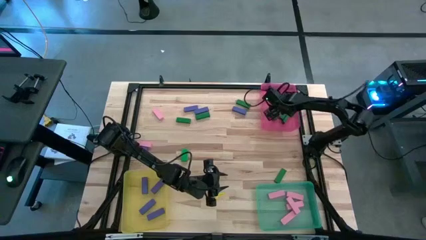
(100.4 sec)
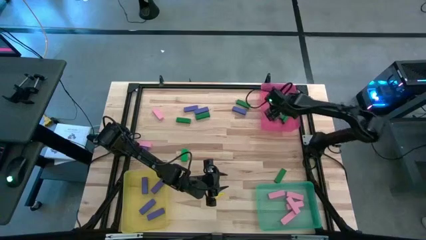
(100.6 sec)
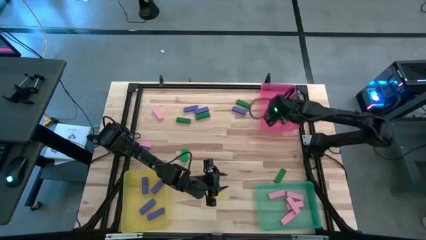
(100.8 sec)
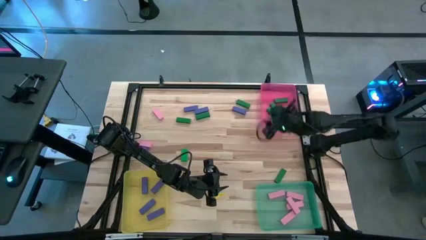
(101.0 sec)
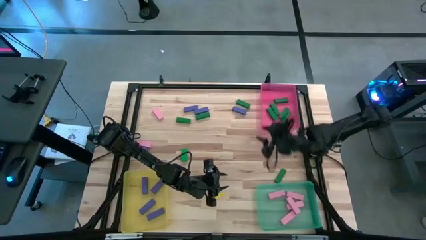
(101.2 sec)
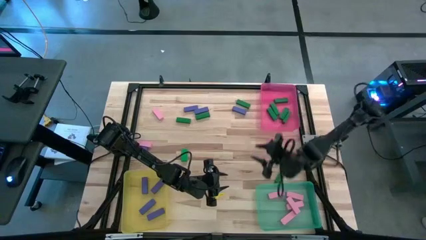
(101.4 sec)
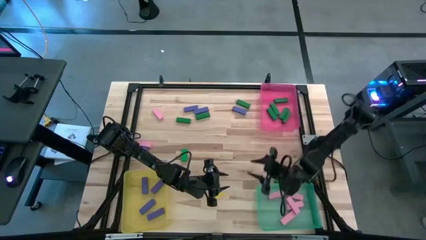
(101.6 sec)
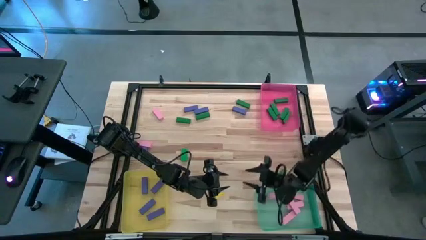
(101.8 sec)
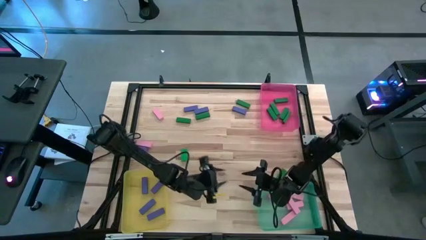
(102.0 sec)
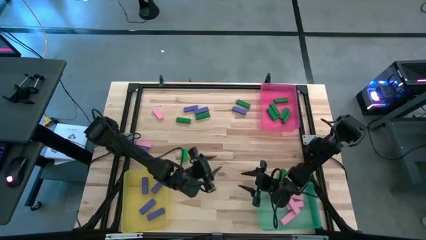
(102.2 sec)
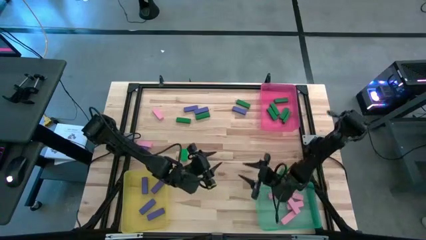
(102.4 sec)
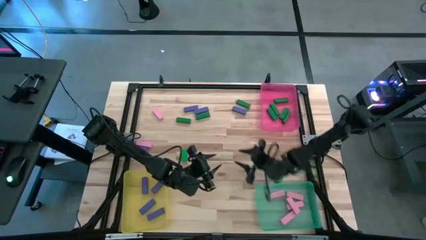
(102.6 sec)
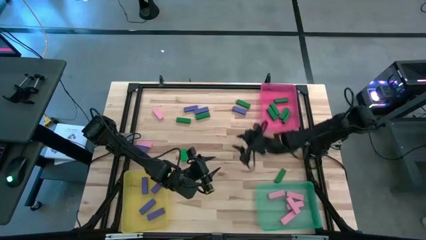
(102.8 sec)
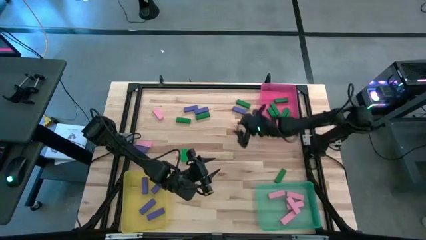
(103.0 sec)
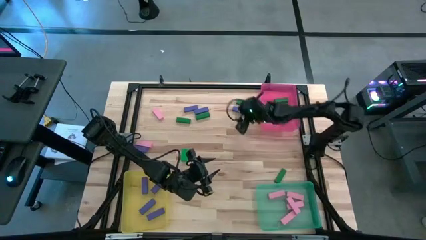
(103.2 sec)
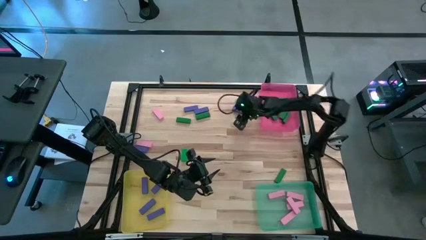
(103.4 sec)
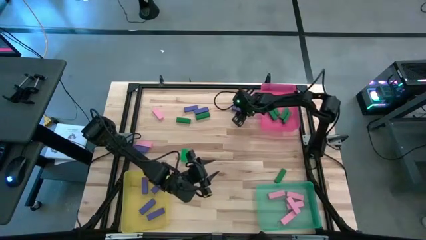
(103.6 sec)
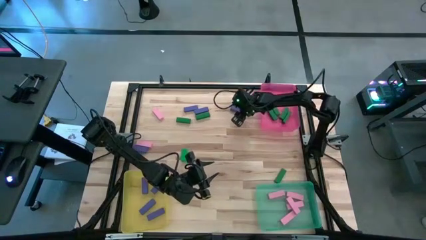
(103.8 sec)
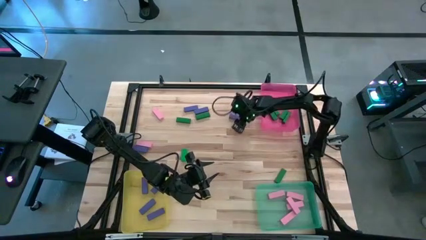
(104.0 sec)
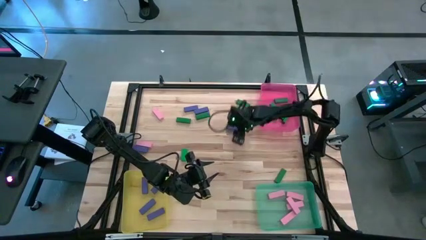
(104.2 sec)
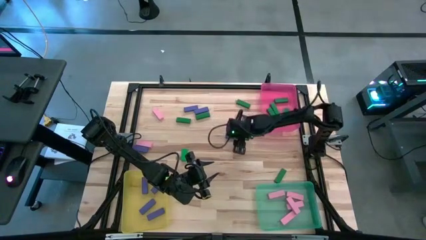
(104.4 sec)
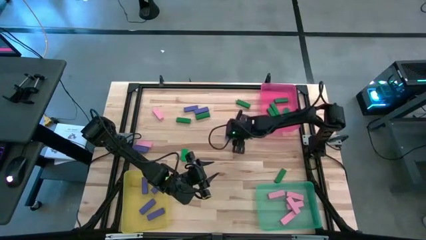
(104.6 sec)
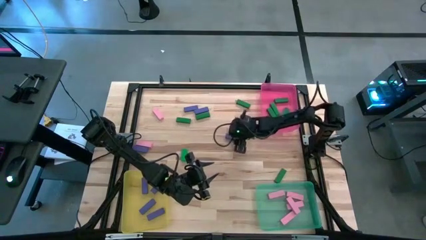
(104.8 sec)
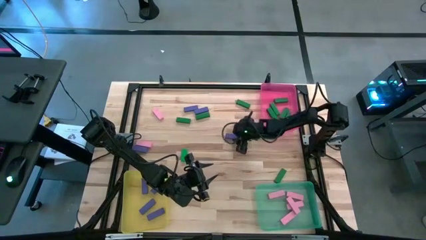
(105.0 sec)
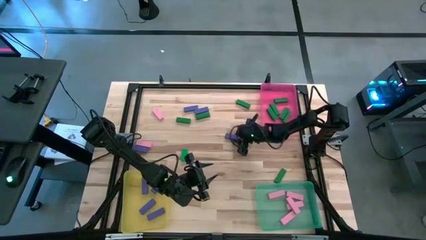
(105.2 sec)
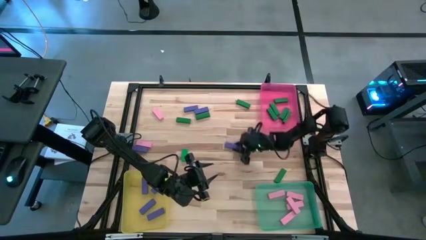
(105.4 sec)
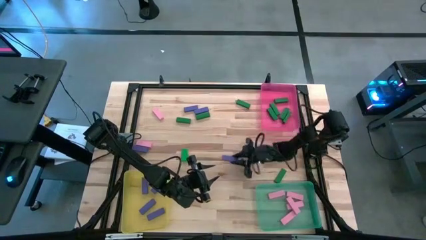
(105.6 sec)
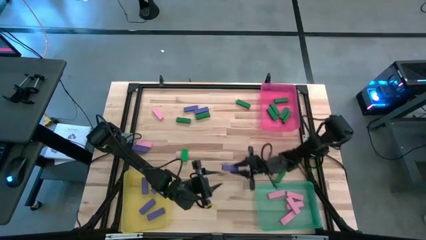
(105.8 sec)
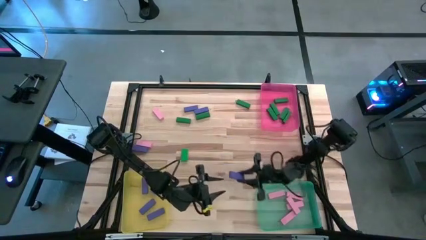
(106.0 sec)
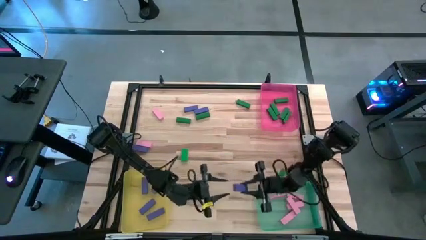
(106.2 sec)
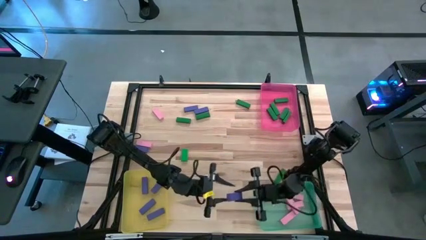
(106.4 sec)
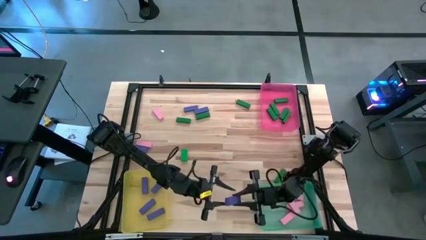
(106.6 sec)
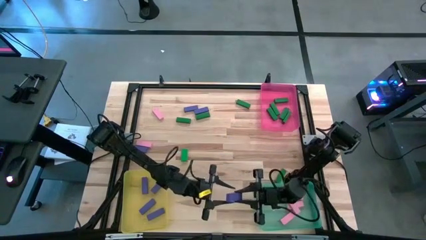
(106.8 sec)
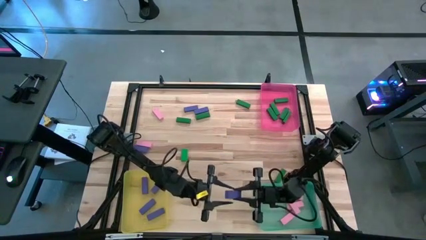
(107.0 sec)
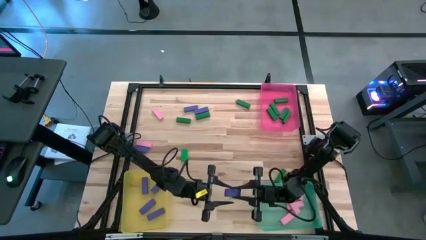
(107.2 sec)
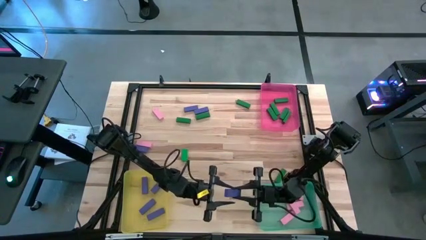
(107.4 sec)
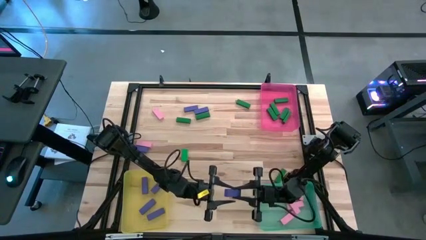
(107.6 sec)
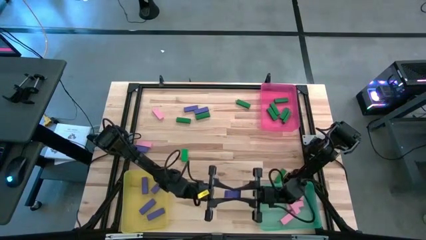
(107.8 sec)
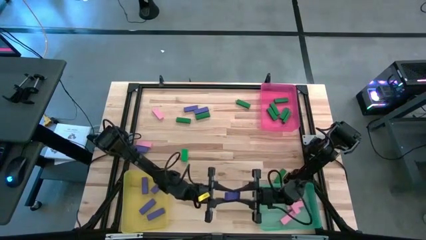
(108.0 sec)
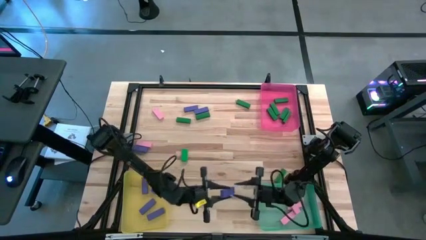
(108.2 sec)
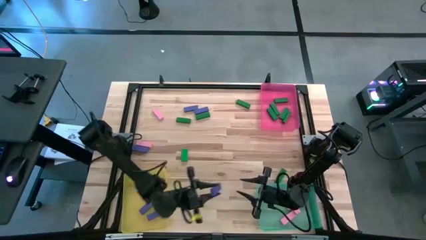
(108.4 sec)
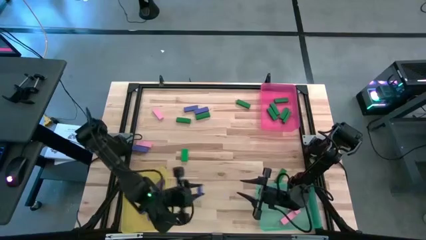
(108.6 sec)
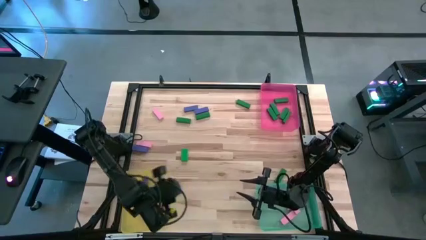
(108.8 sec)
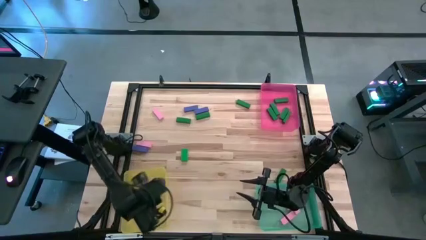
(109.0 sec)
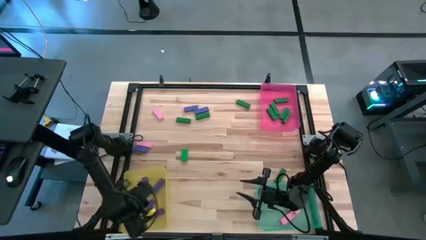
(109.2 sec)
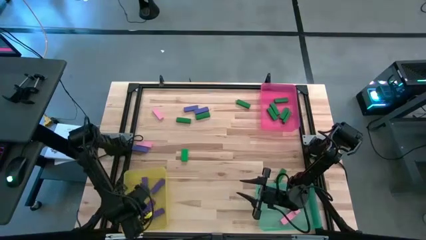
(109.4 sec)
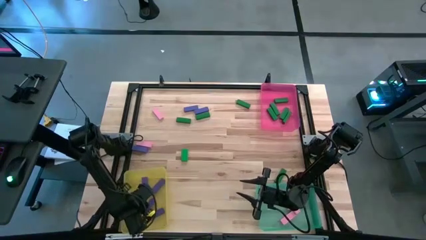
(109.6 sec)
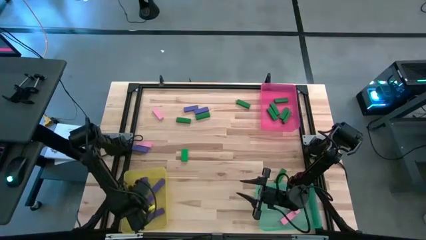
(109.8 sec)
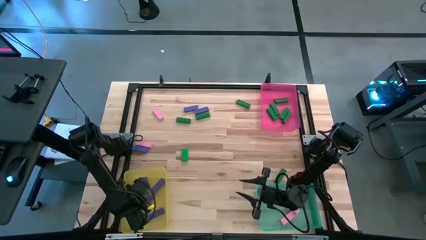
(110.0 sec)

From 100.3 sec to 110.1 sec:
Task: Sort blocks
Put the blue block into the yellow bin

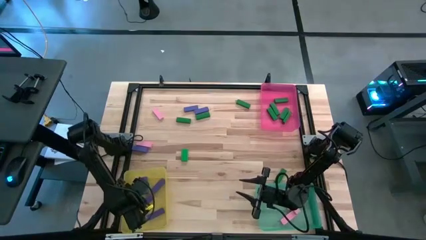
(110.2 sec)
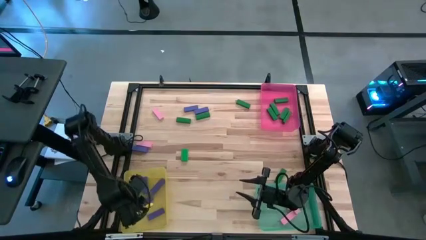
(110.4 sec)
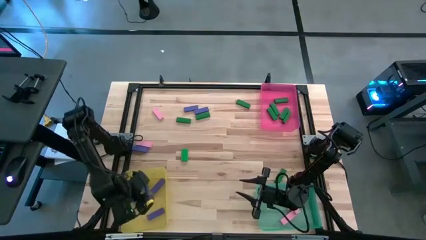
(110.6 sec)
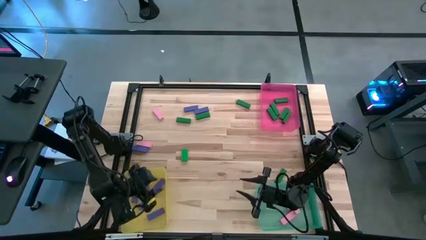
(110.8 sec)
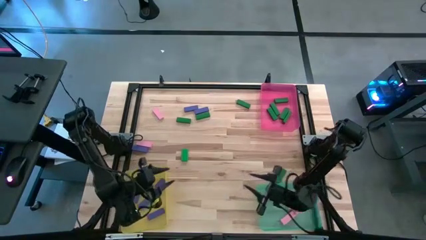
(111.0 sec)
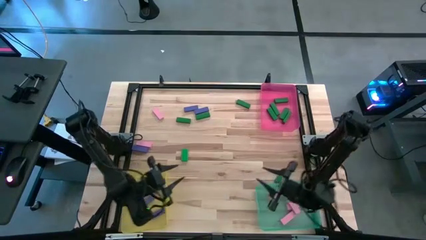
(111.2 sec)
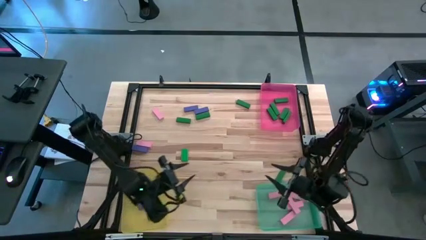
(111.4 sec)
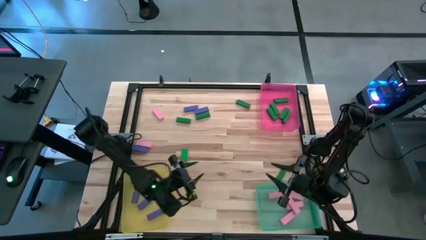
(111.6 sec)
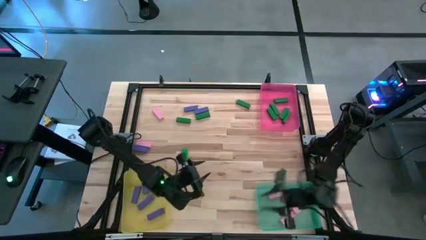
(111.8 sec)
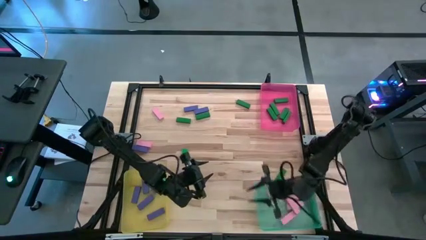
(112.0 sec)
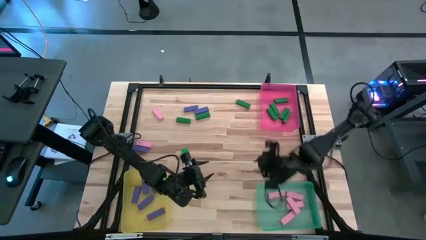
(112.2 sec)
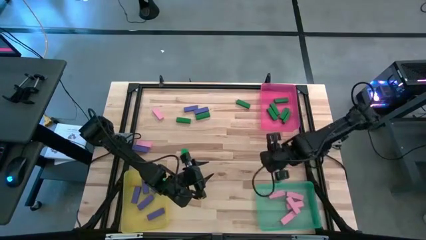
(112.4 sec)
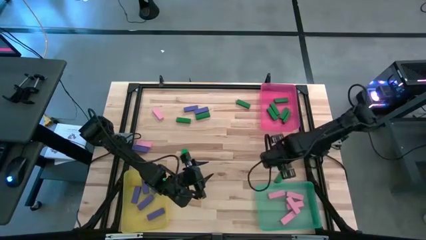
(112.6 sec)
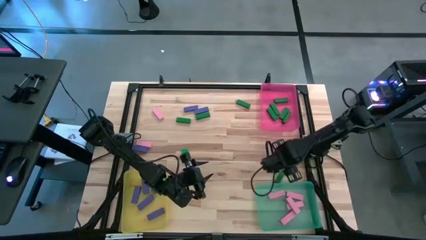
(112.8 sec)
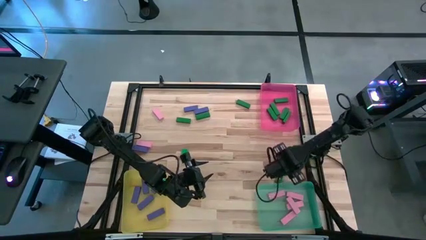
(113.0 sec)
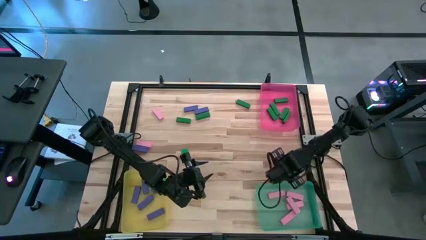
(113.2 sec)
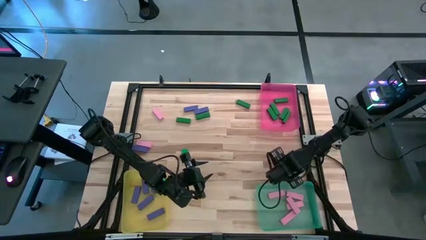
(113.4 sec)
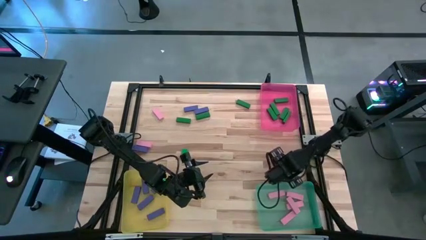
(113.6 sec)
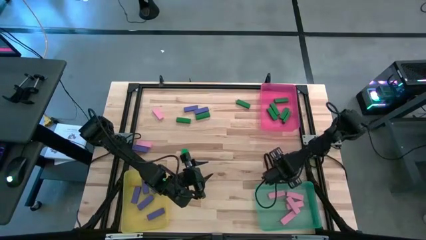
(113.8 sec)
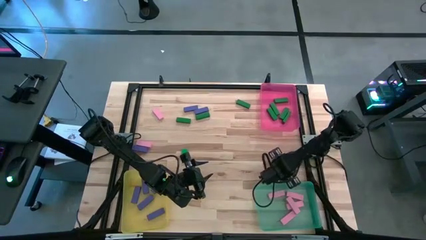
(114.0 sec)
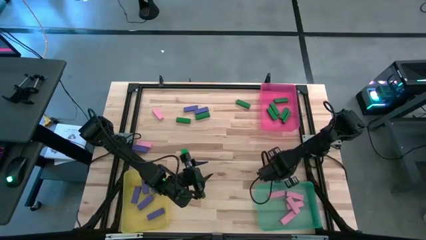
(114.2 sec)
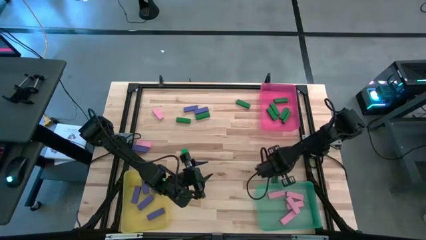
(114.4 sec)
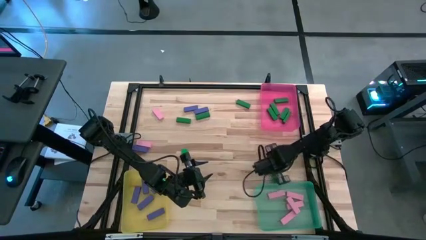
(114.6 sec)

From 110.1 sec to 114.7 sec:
Put the green block into the pink bin

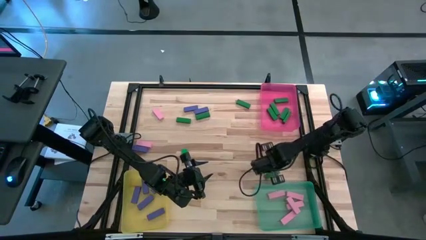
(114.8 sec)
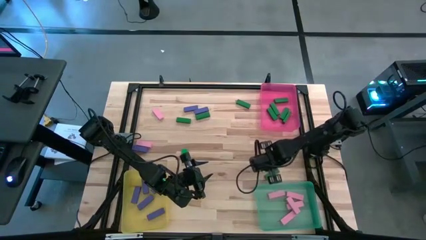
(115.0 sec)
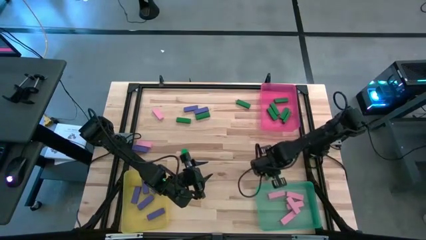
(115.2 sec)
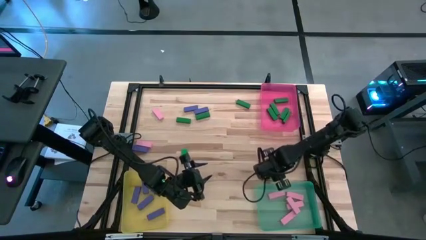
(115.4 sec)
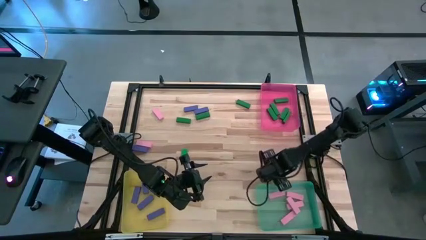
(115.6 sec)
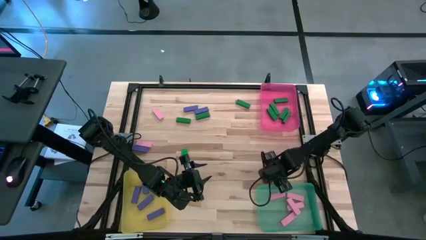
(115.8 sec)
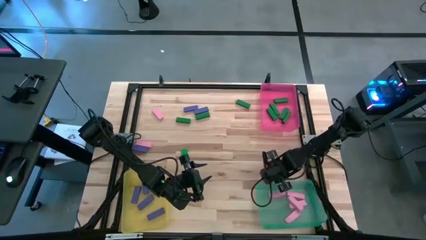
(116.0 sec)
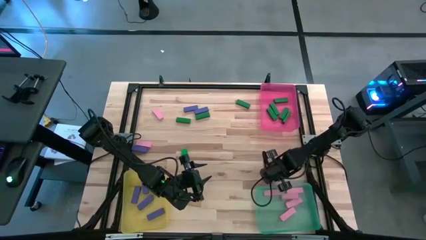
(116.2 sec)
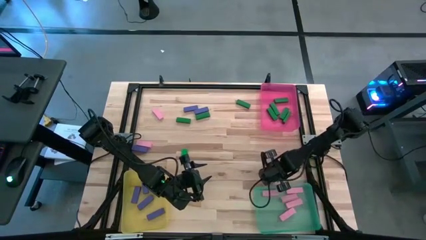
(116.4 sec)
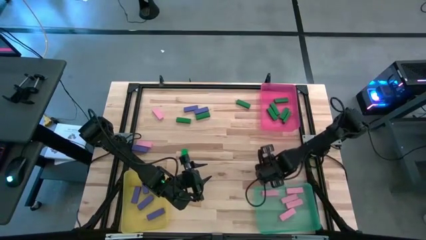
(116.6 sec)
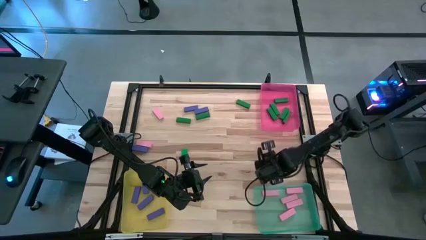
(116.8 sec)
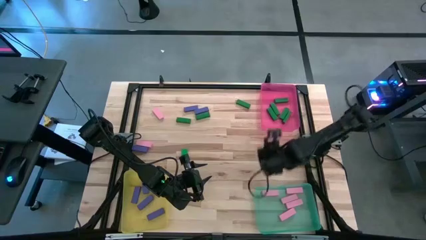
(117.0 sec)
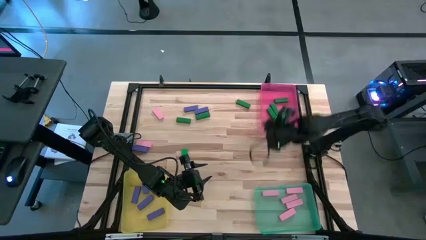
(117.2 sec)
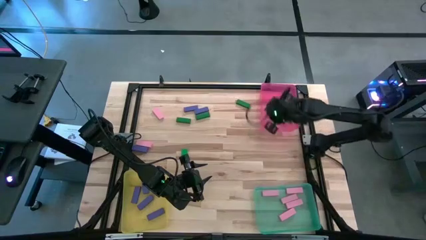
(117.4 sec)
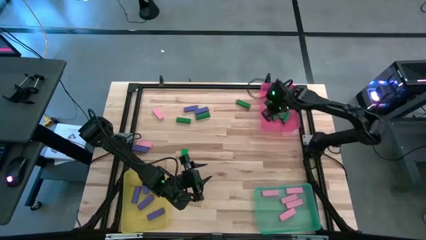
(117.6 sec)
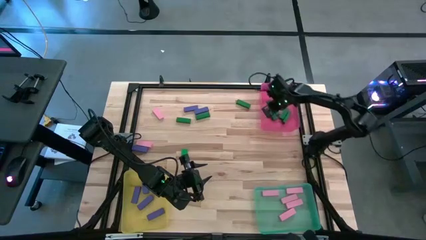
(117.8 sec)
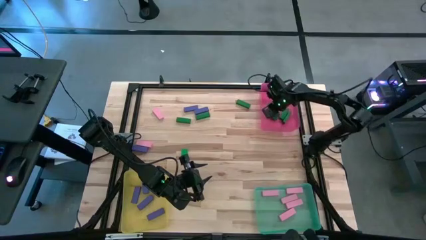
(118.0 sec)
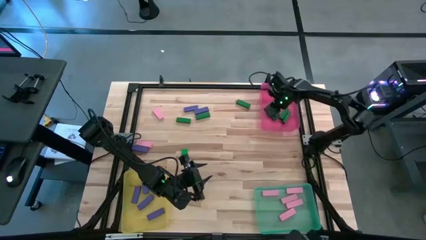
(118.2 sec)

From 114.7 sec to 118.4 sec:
Put the green block into the pink bin
